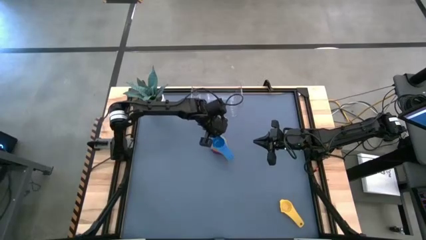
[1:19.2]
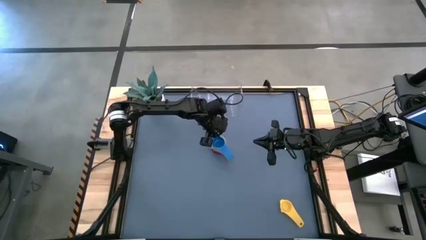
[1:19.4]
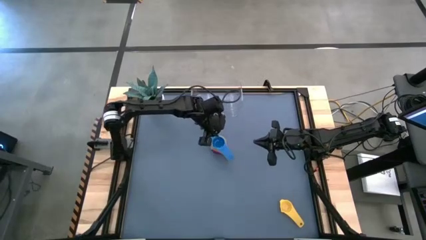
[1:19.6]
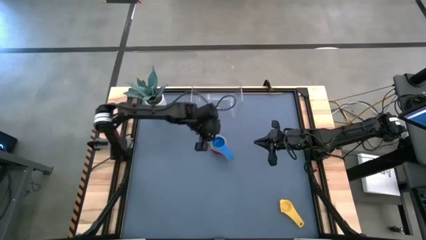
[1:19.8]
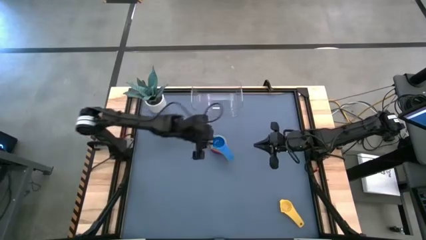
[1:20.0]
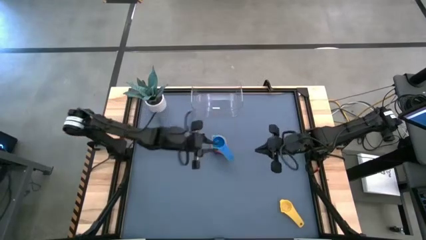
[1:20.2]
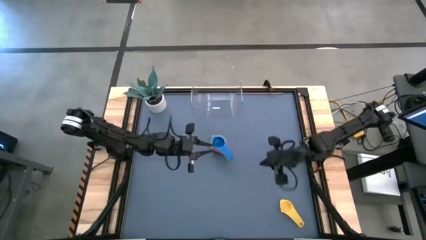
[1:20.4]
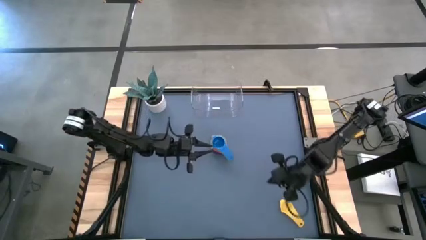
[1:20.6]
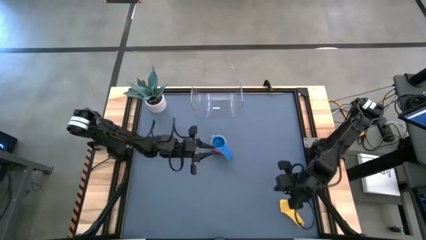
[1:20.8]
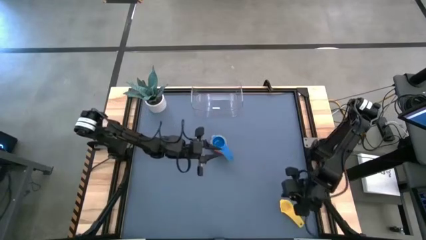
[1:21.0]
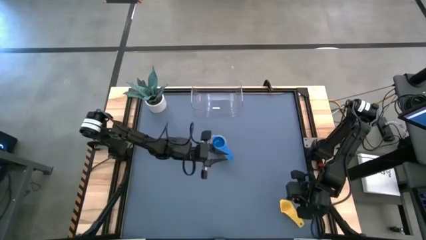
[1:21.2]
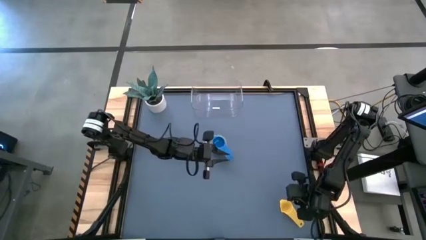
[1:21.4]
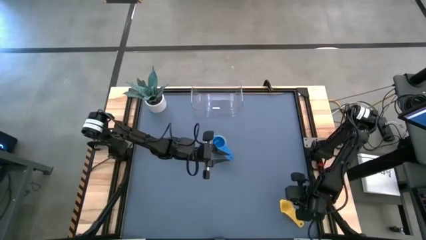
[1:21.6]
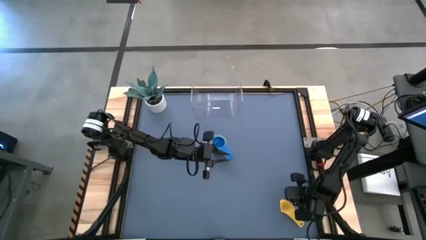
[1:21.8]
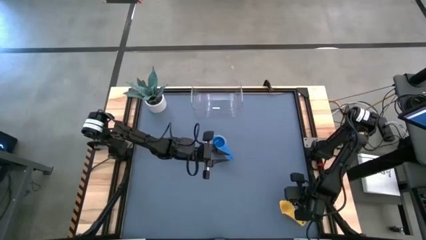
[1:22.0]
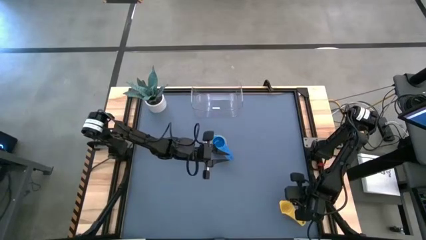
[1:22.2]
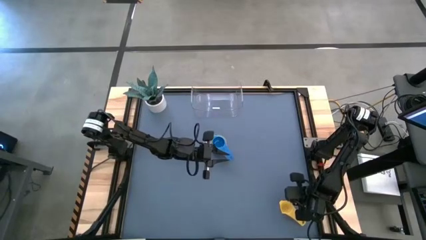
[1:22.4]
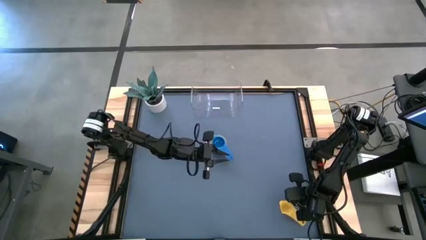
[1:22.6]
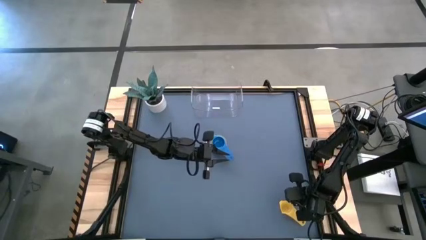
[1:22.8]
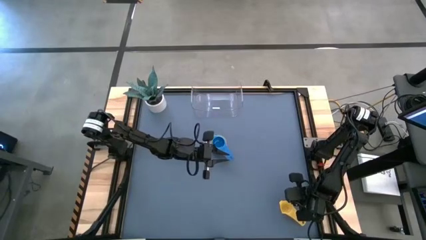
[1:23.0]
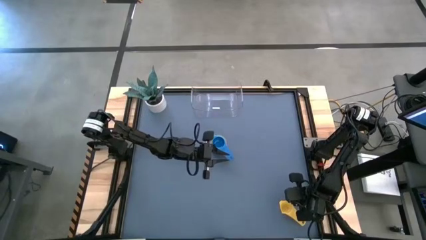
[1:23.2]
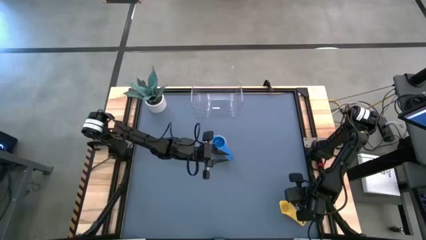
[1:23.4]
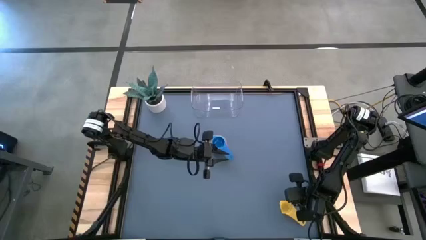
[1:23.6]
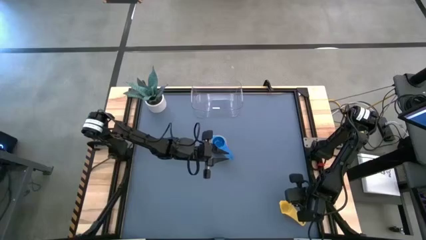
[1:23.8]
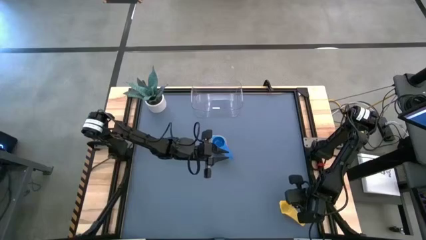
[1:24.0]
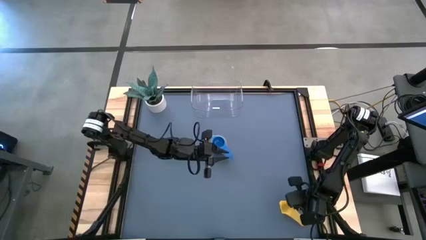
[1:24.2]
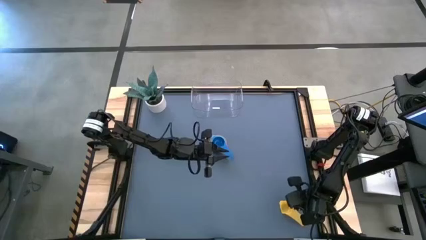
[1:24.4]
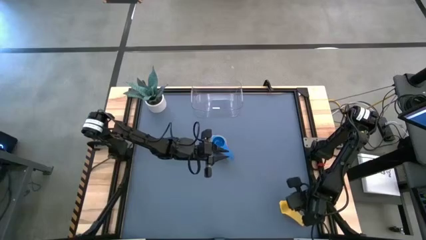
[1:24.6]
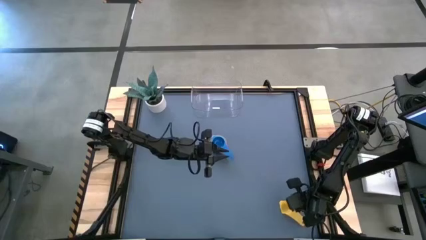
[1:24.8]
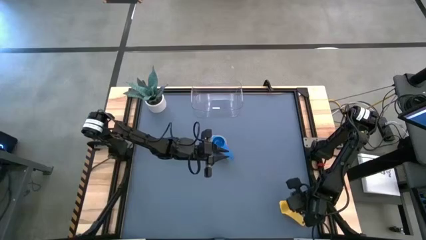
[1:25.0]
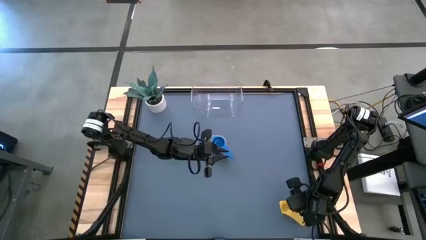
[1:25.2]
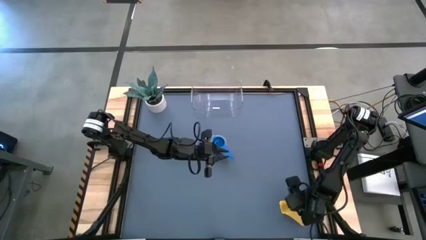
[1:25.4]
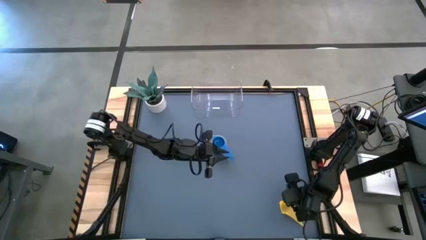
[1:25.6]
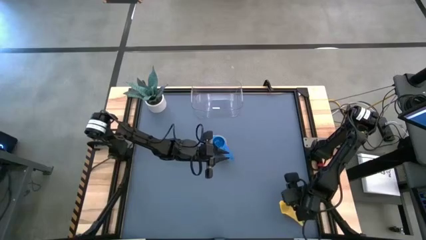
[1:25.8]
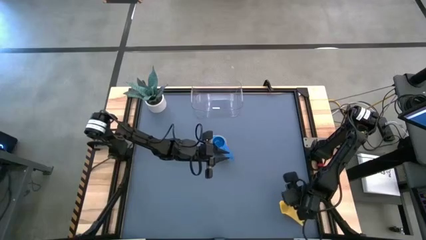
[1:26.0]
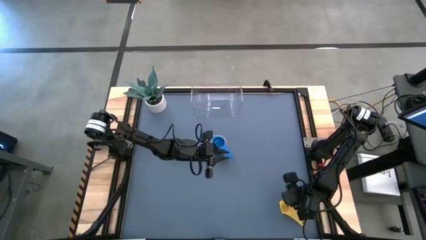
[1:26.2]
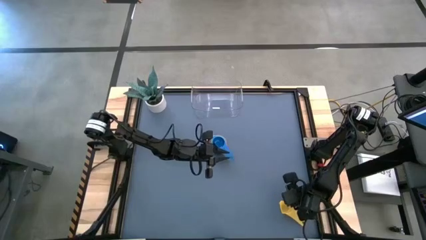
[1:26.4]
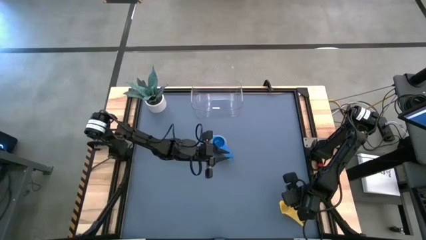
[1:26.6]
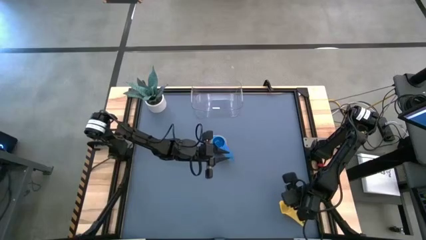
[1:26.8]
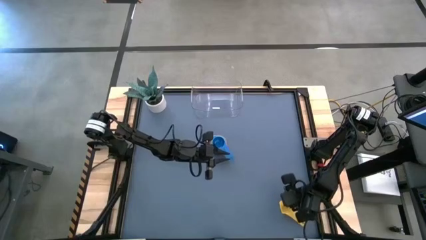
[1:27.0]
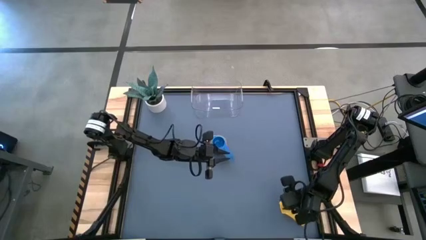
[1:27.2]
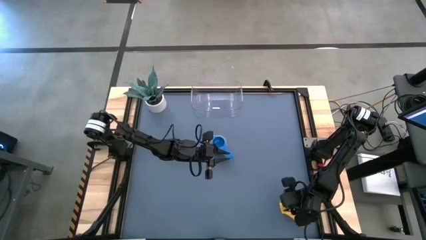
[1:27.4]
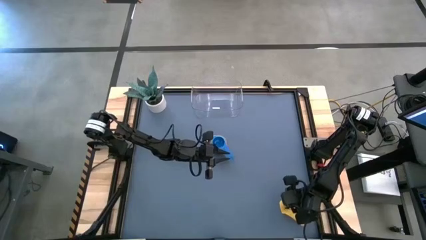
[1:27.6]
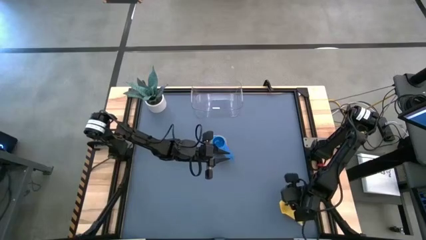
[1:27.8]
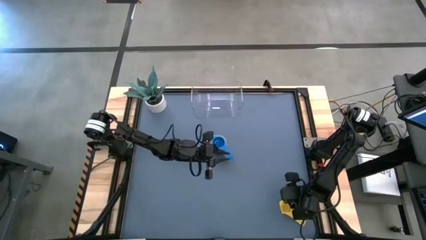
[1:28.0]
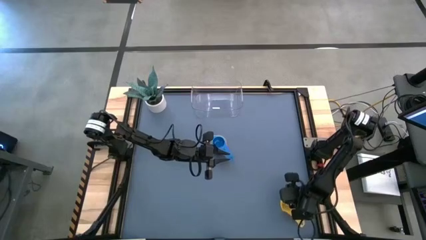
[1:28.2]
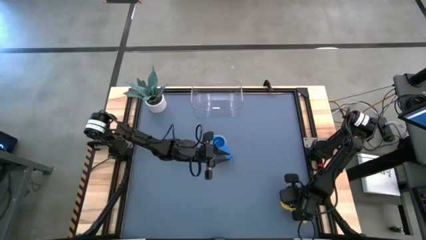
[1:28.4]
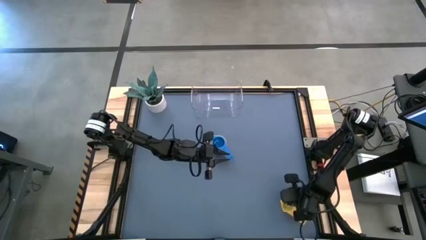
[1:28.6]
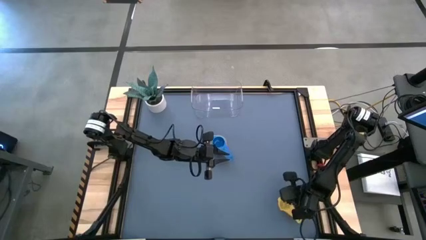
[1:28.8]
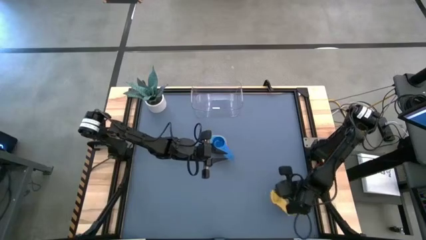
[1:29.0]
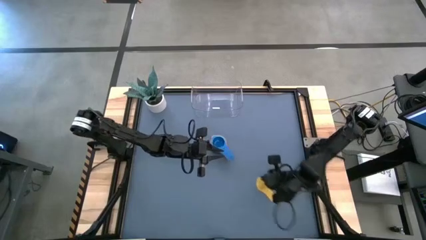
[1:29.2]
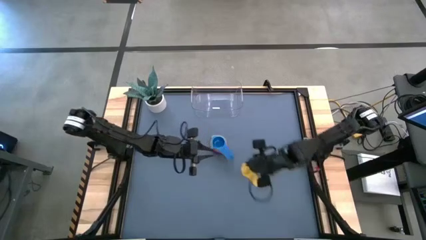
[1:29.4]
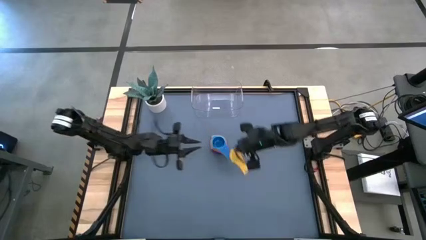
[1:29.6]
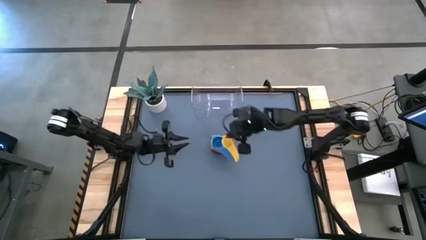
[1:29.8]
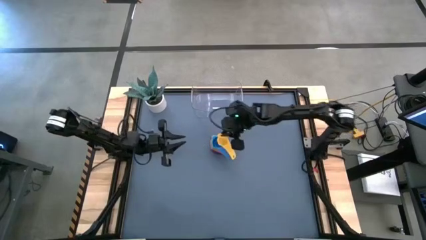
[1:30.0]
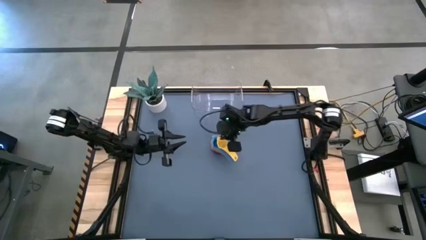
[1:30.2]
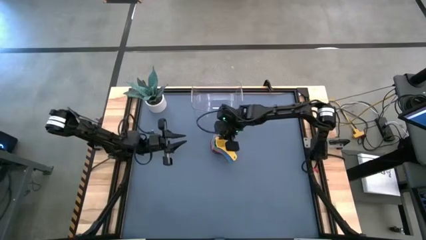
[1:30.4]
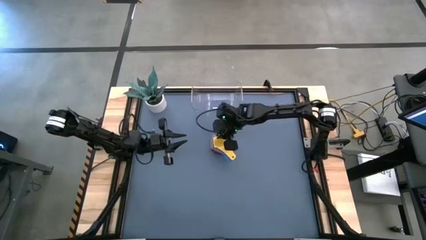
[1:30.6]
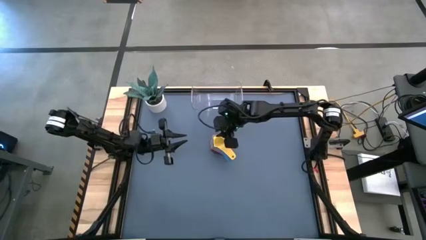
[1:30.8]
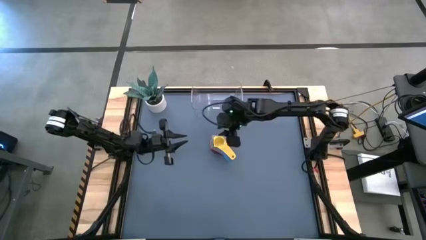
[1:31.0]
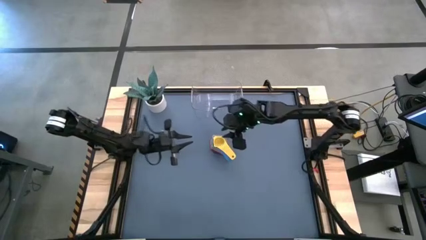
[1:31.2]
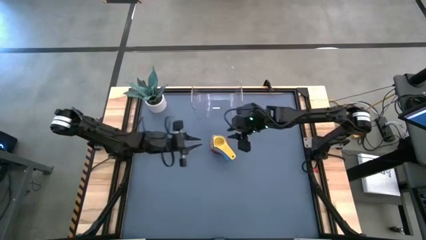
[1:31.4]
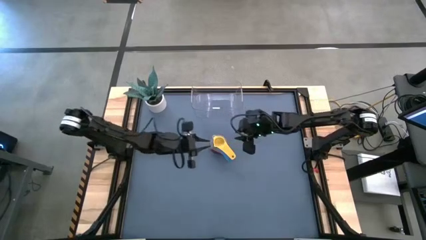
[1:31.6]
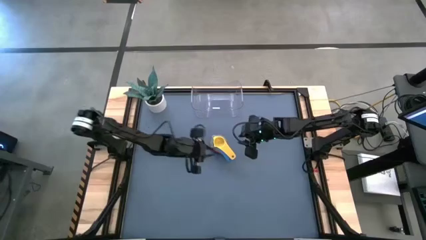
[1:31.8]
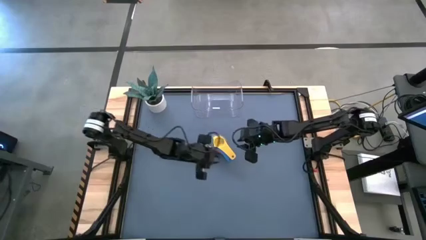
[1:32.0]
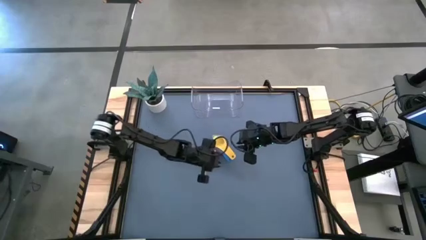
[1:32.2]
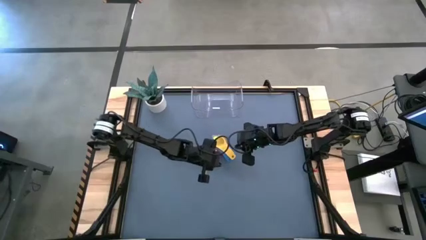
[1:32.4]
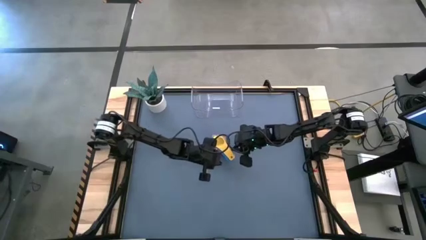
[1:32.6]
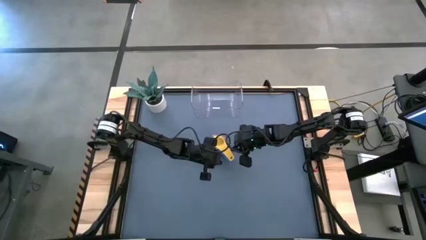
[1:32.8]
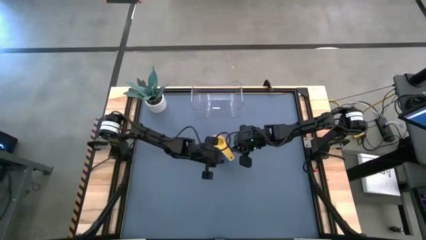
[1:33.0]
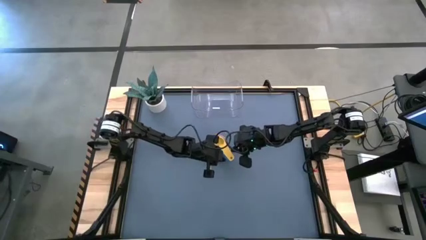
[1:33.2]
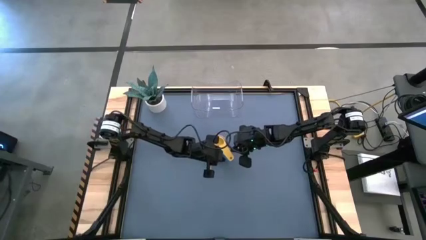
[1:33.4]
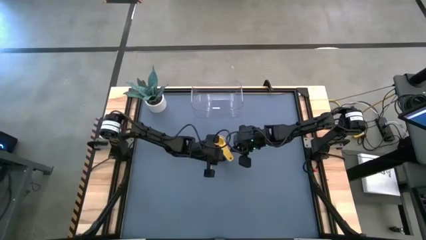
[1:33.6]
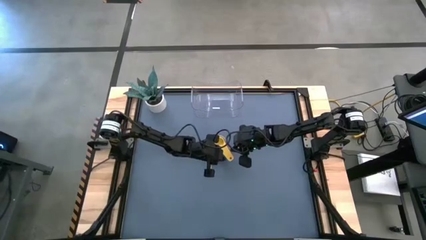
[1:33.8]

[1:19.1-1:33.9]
Task: Nest measuring cups in basket
Stack the yellow measuring cup on top of the blue measuring cup
